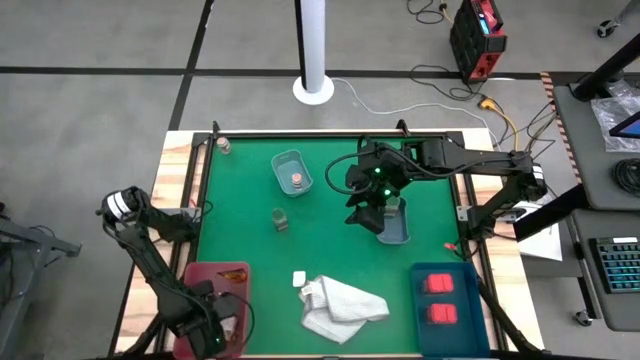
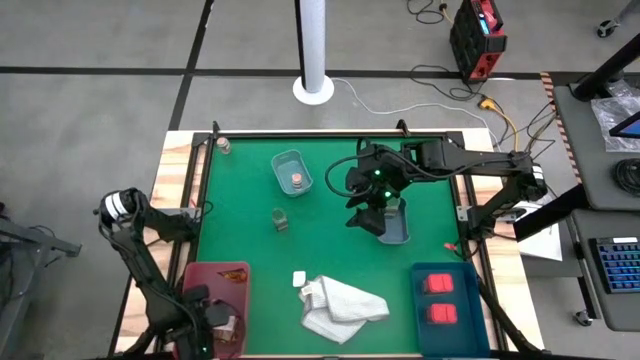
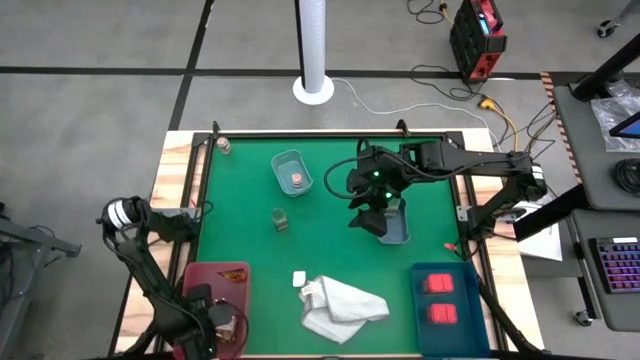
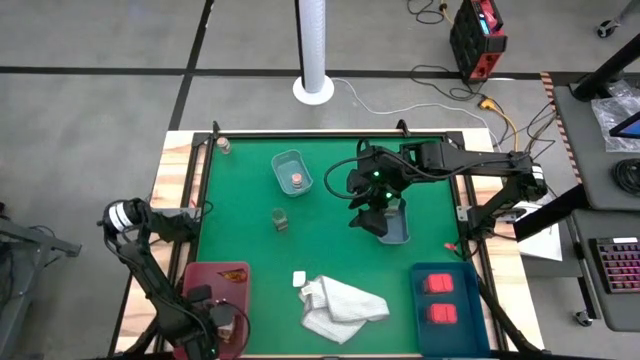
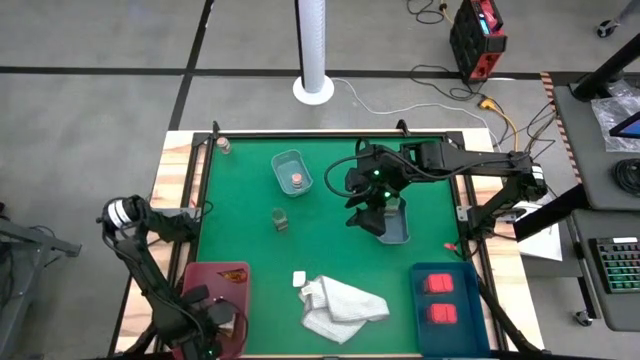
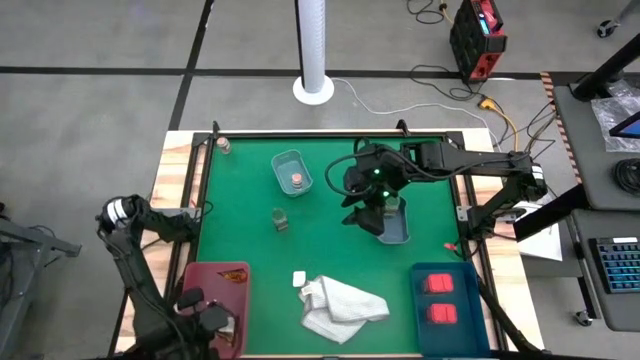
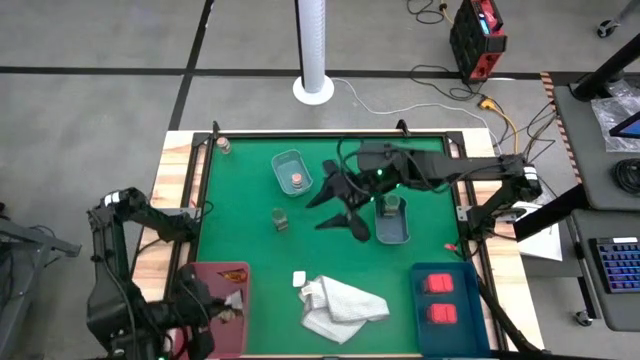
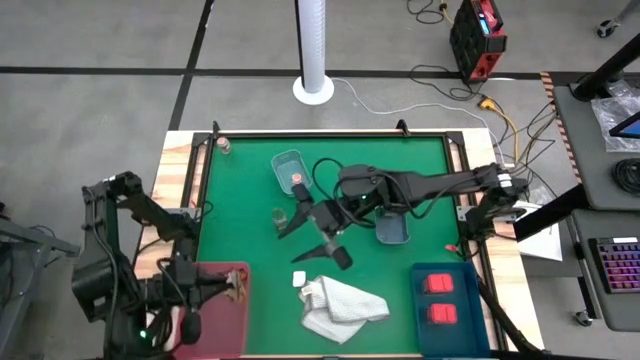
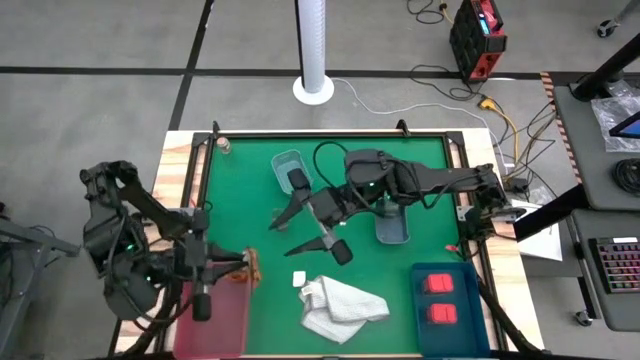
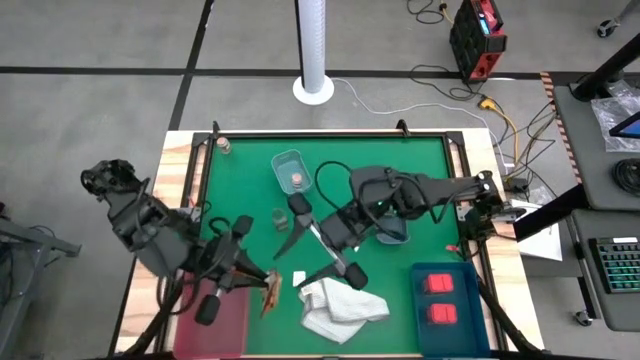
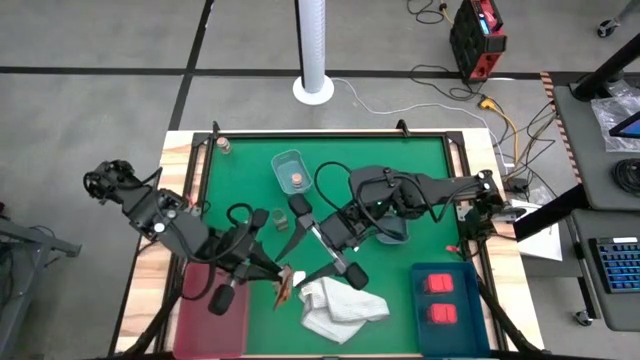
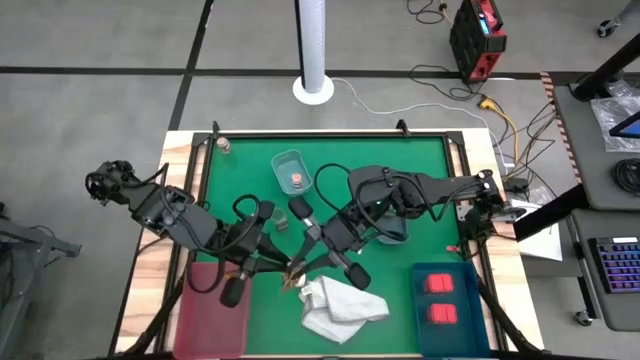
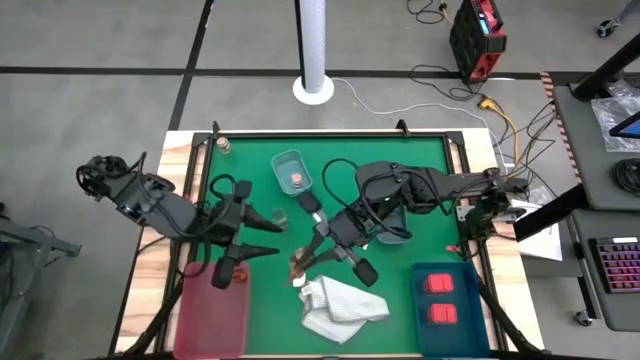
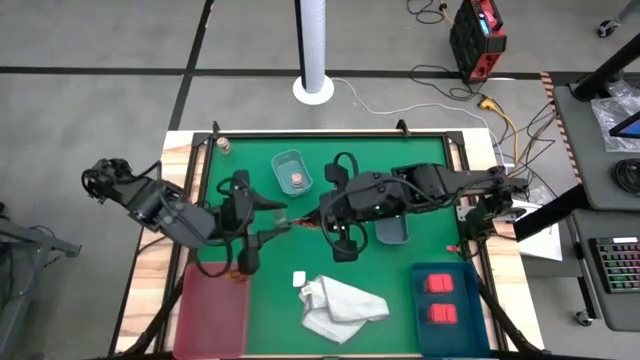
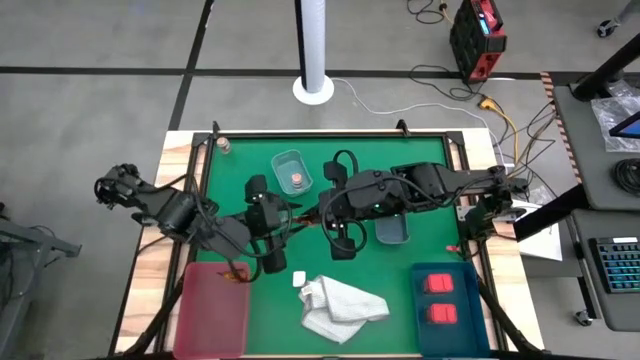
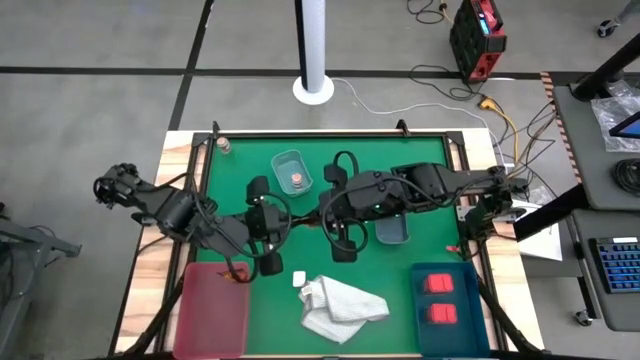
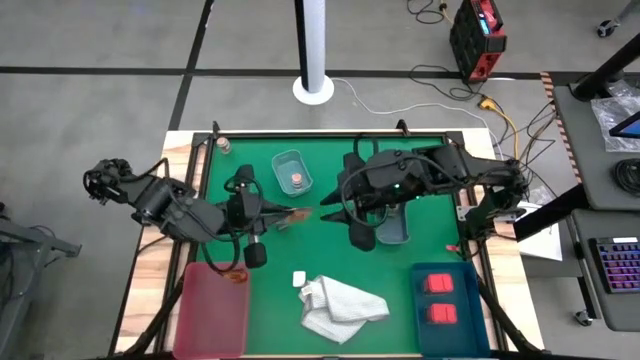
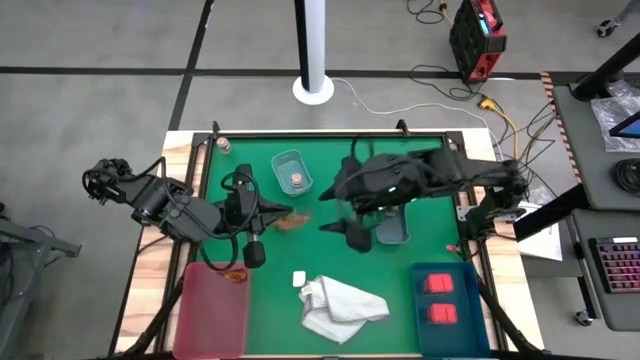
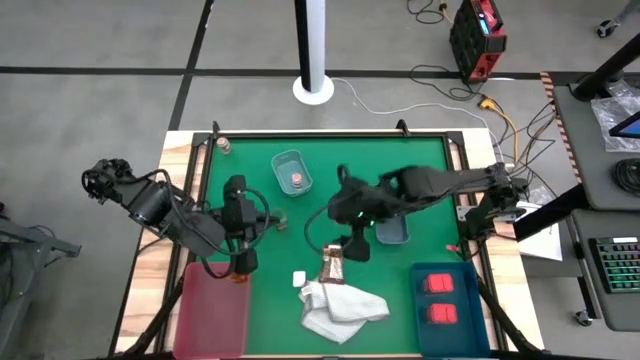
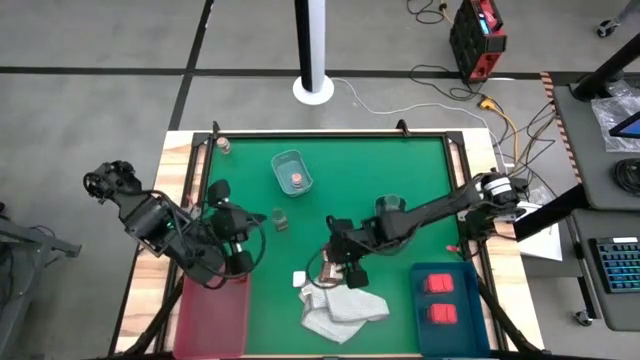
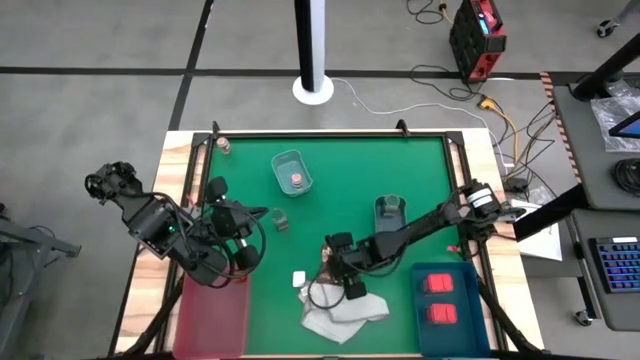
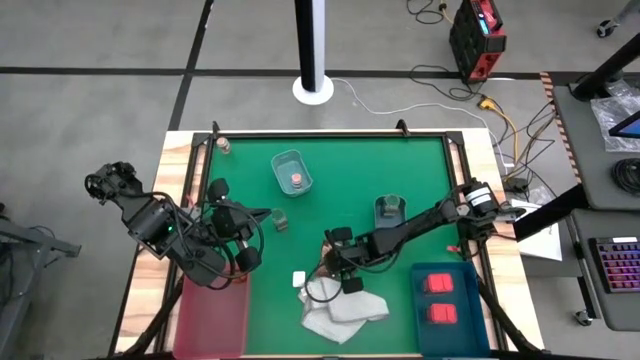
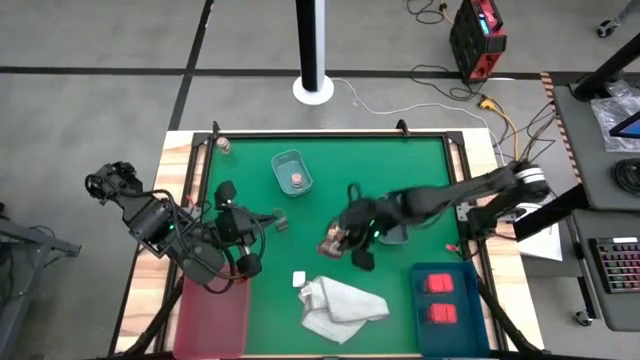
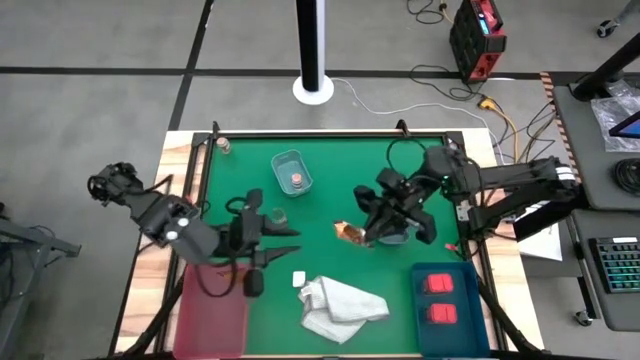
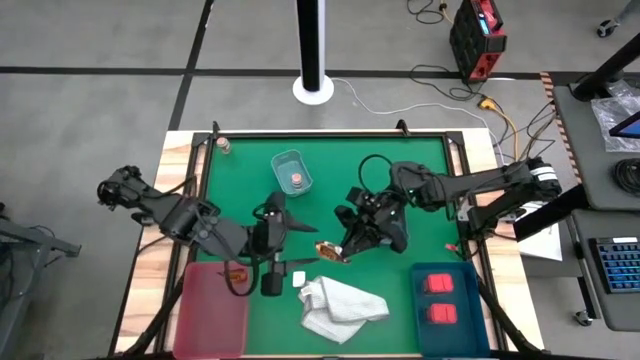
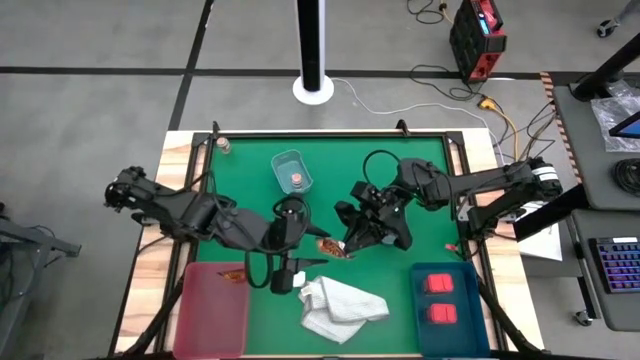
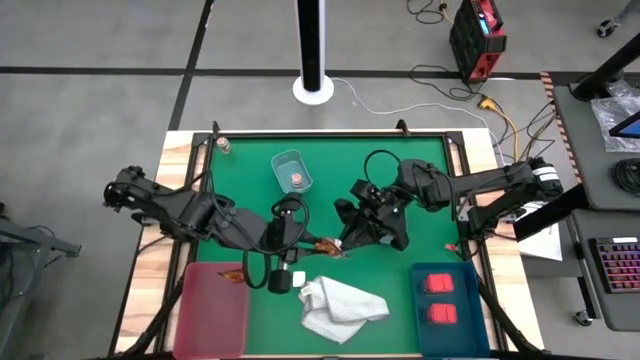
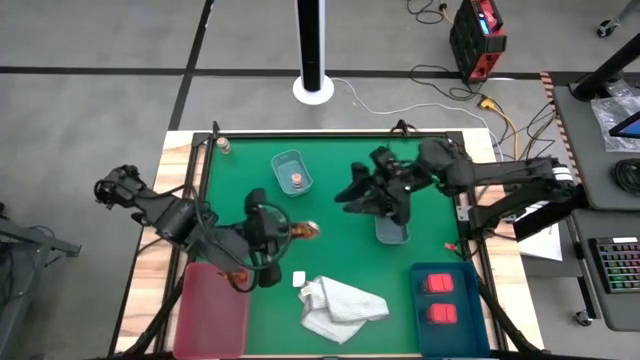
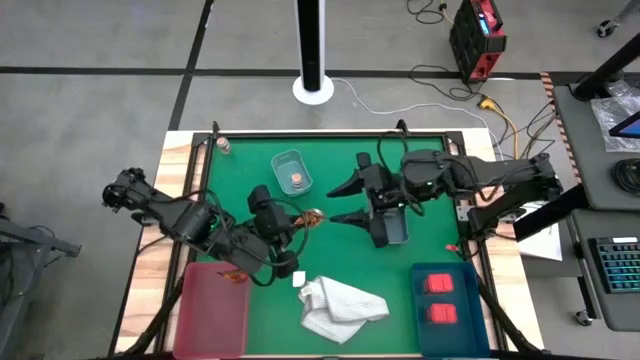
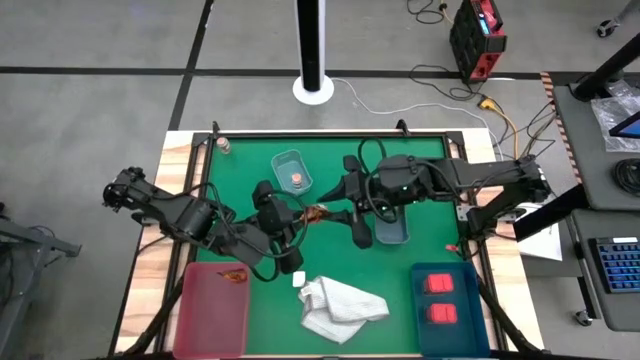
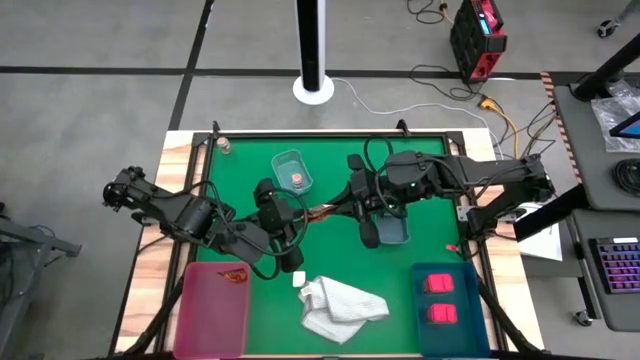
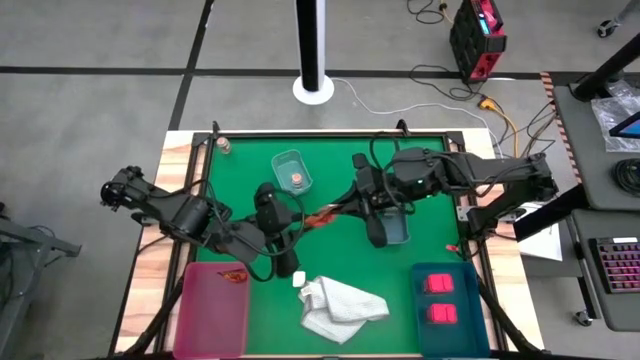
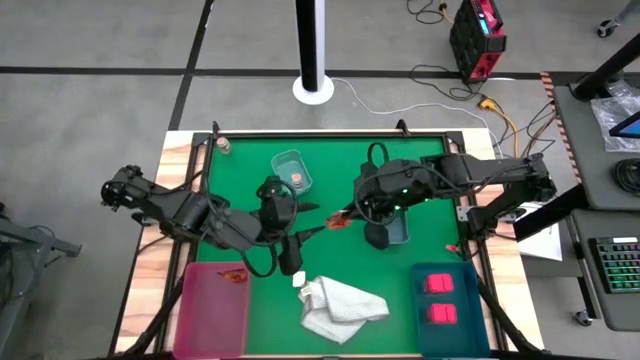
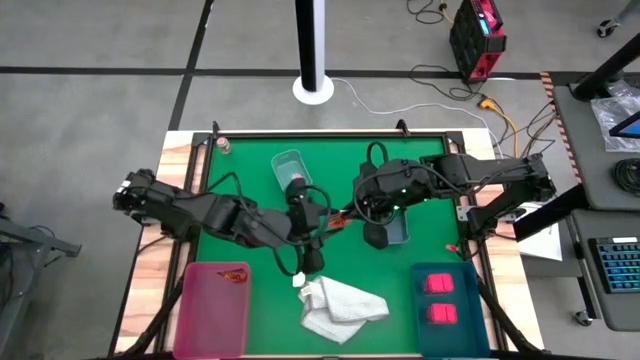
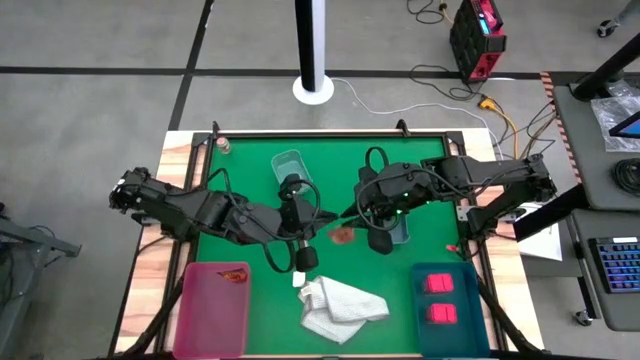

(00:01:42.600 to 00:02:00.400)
Task: Sort spices by type
Put the orange spice pack into the pink bin

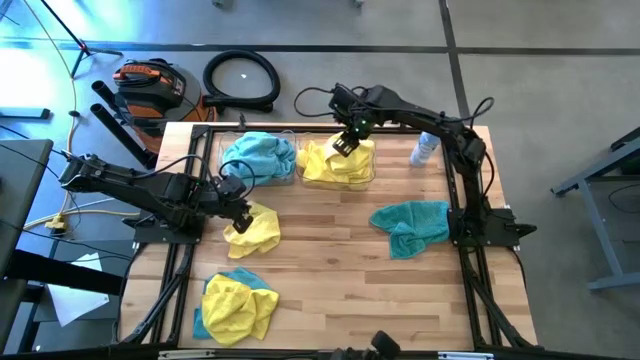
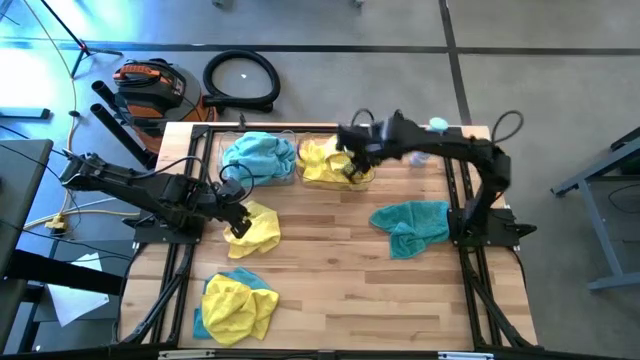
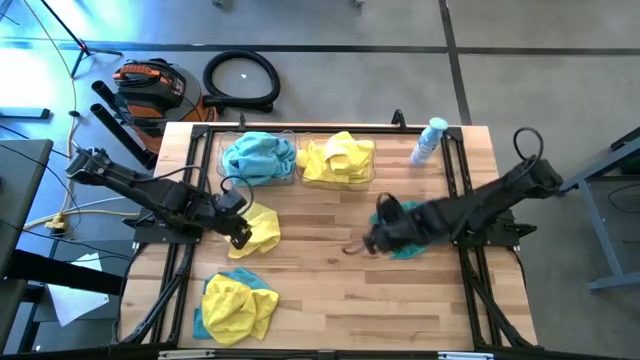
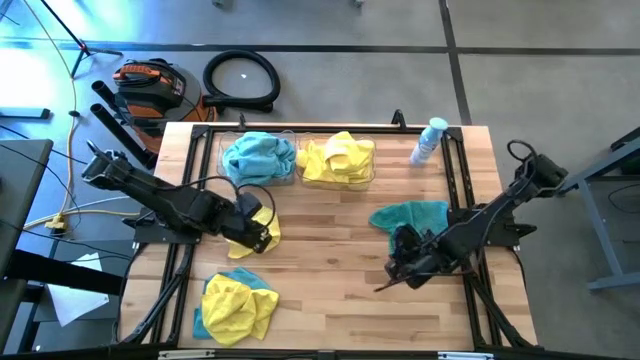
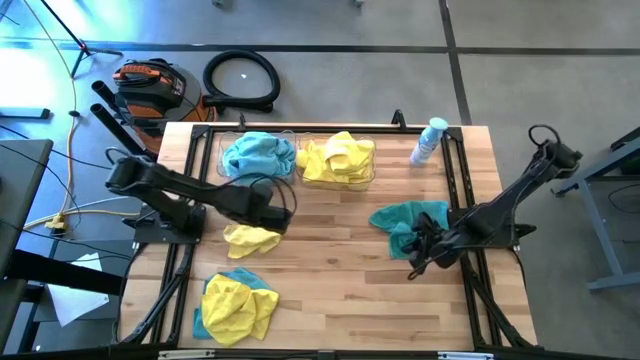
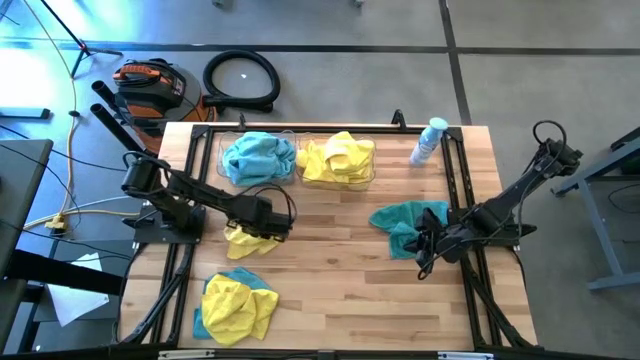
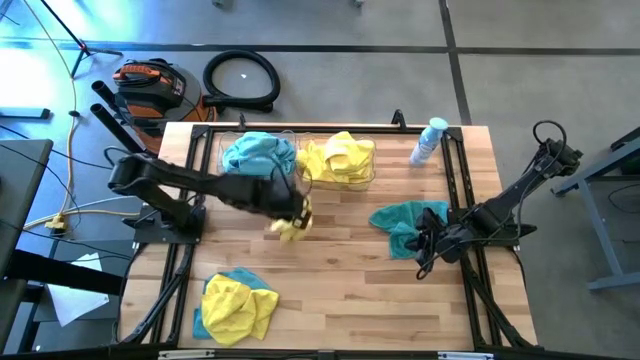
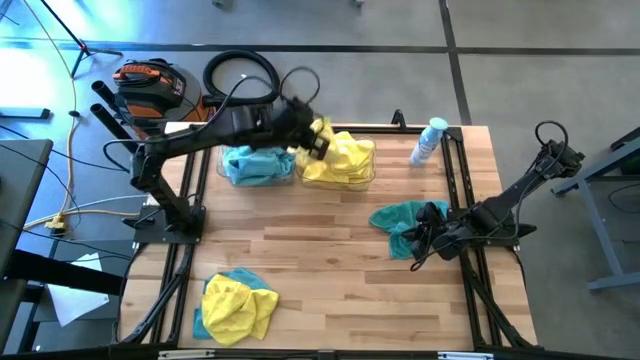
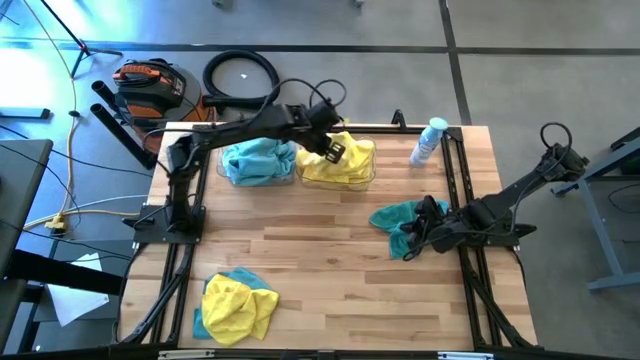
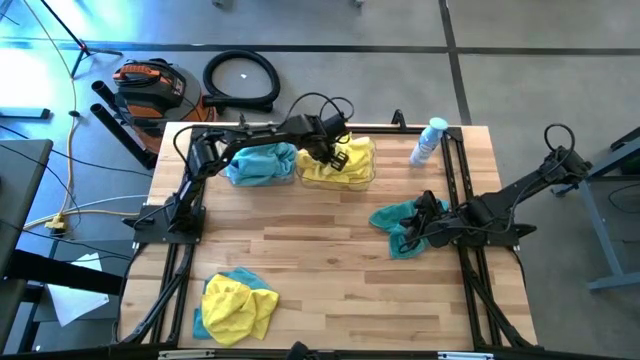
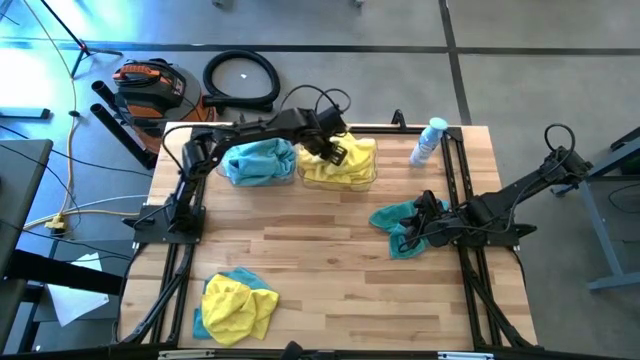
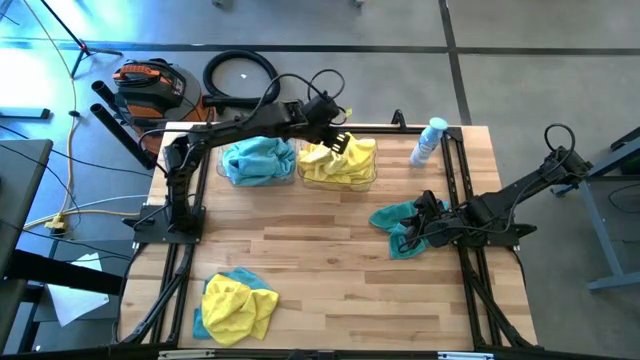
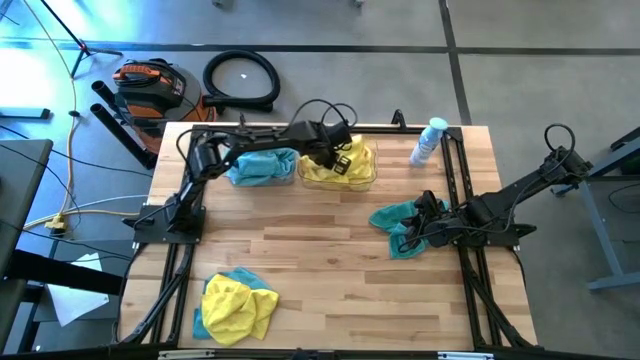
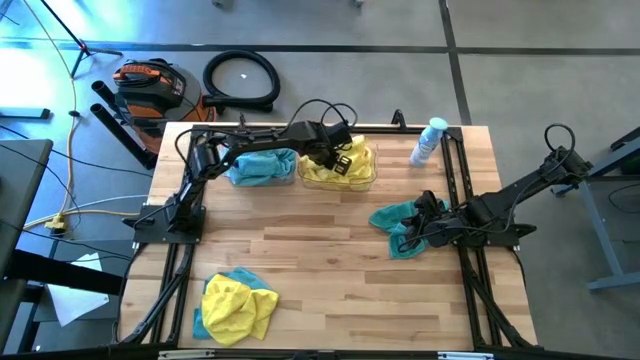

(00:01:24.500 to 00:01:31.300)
Task: Sort microfiber towel by color & place in baskets
Put the yellow towel into the right transparent bin
